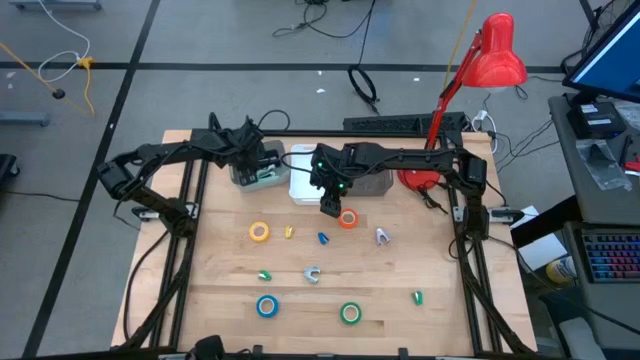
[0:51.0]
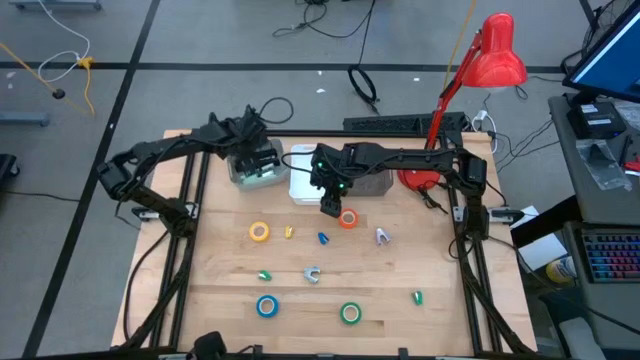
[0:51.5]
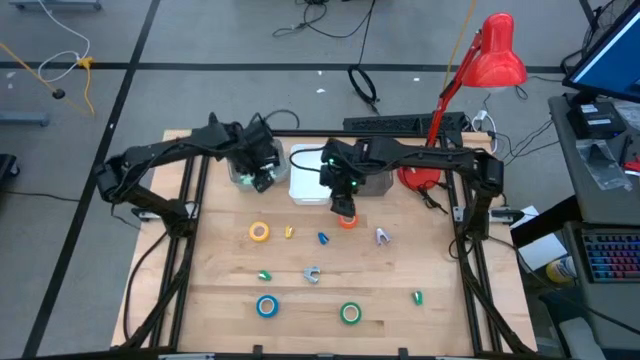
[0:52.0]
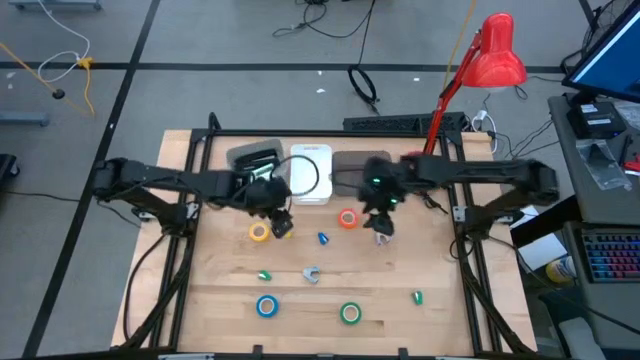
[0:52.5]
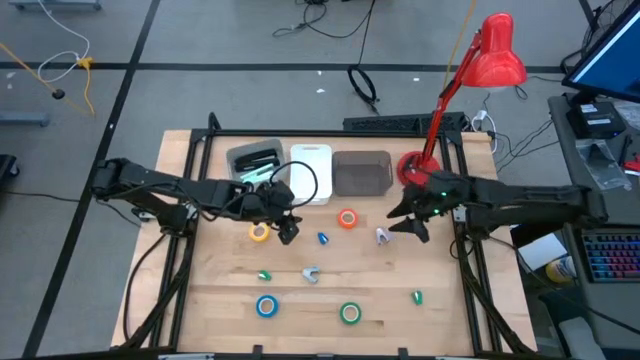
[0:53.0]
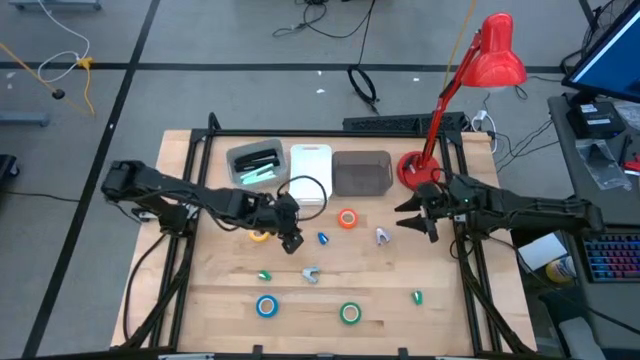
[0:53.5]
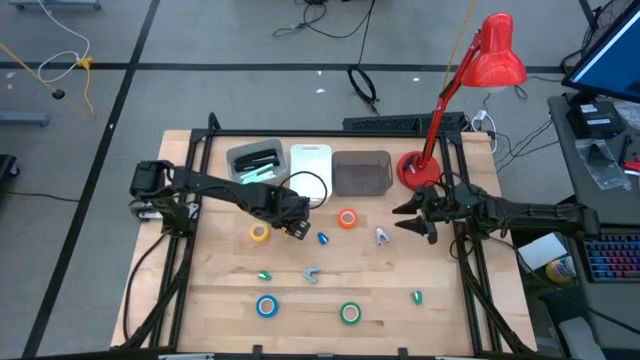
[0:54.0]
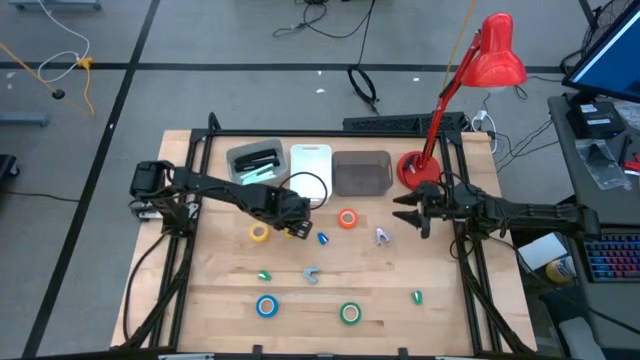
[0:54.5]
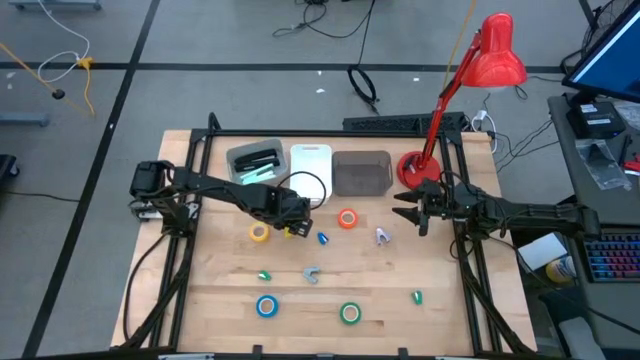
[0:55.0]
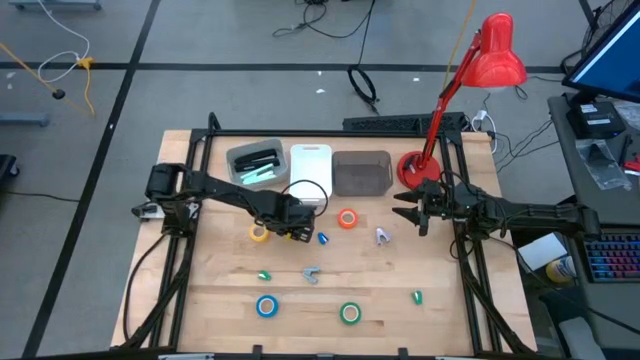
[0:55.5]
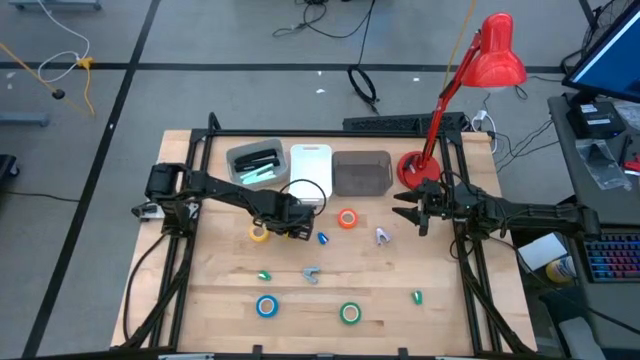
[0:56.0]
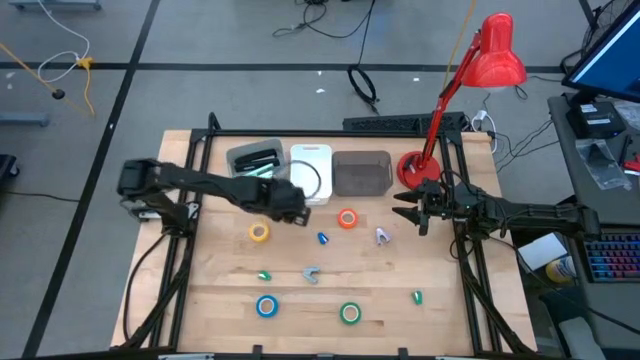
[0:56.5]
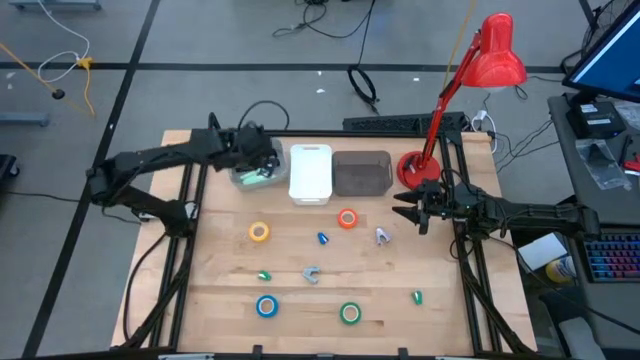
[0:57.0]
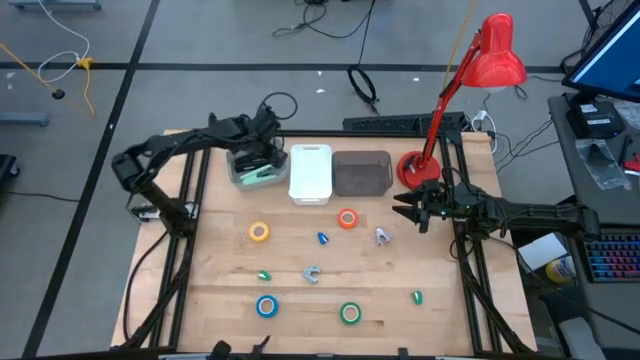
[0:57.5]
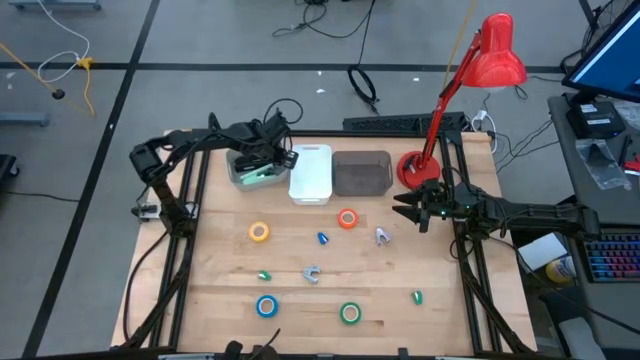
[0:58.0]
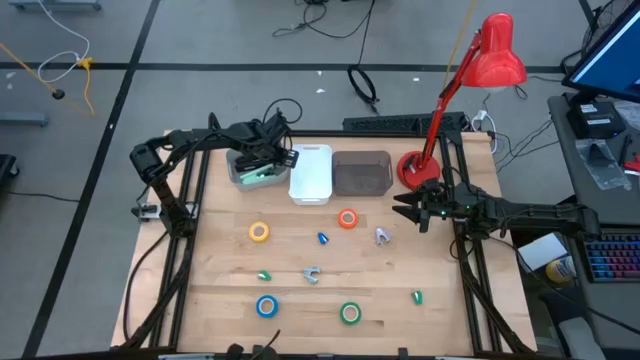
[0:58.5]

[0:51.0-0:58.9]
Task: Pick and place Stapler, Stapler remover, tape
Put the yellow stapler into the gray bin

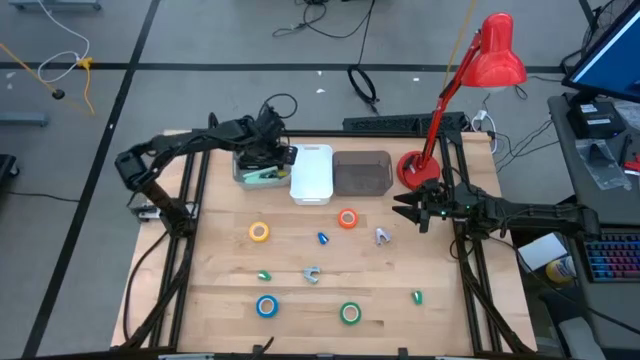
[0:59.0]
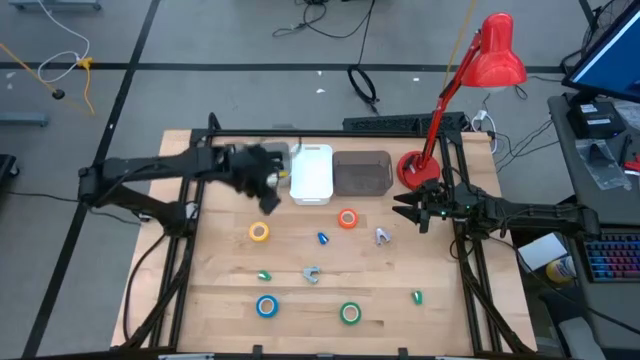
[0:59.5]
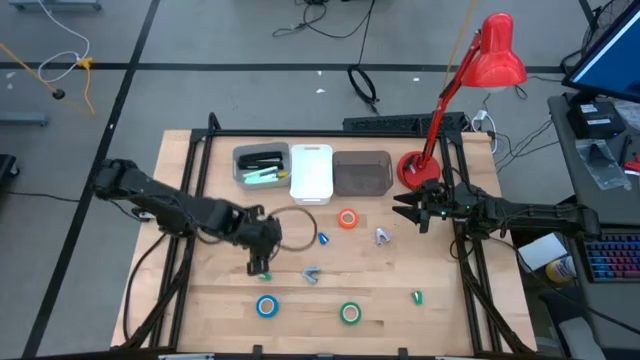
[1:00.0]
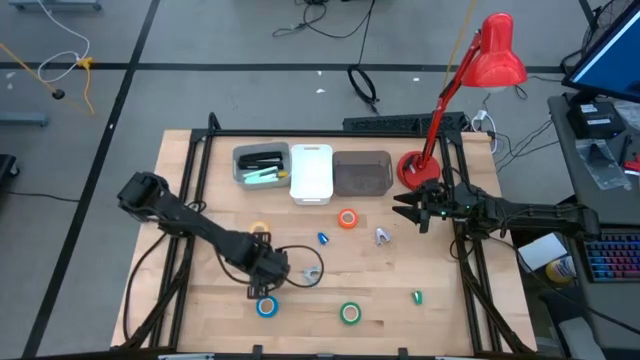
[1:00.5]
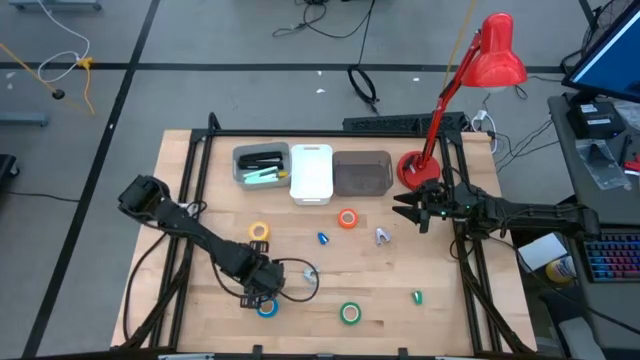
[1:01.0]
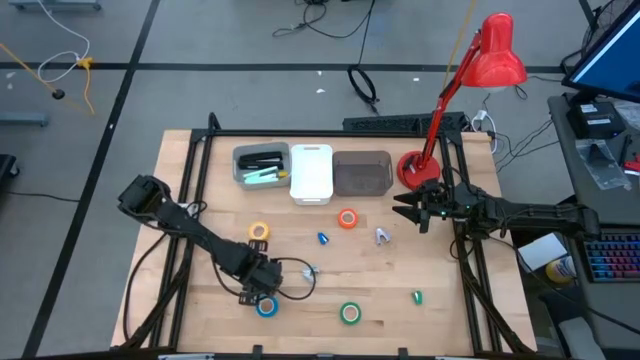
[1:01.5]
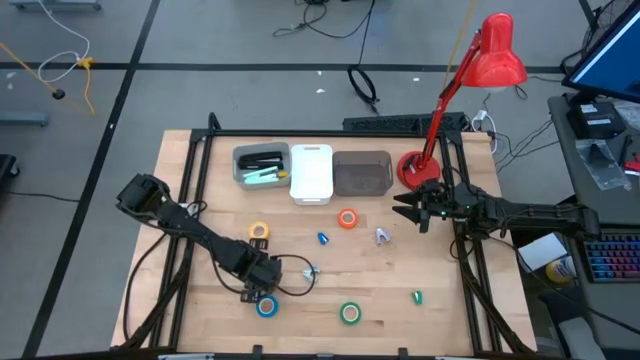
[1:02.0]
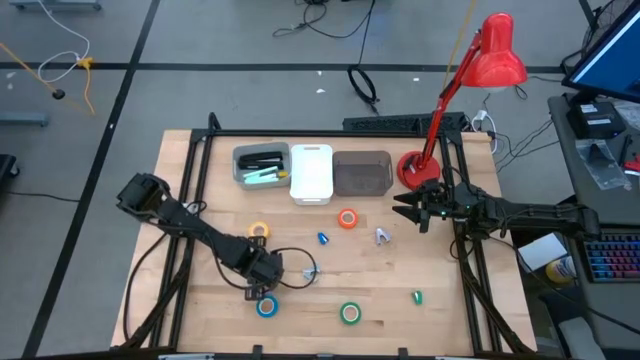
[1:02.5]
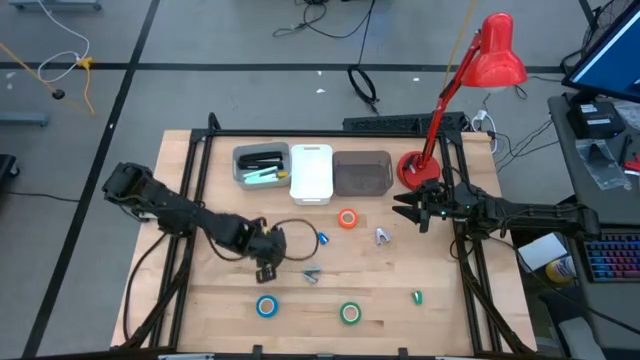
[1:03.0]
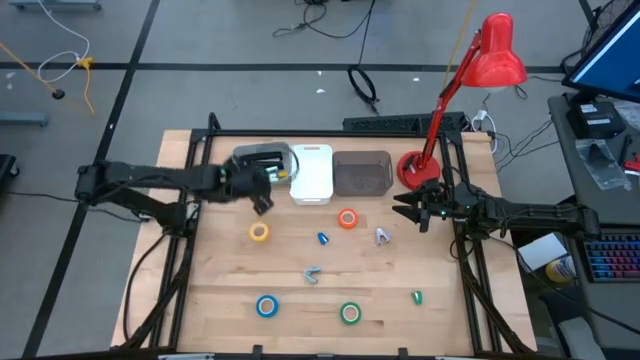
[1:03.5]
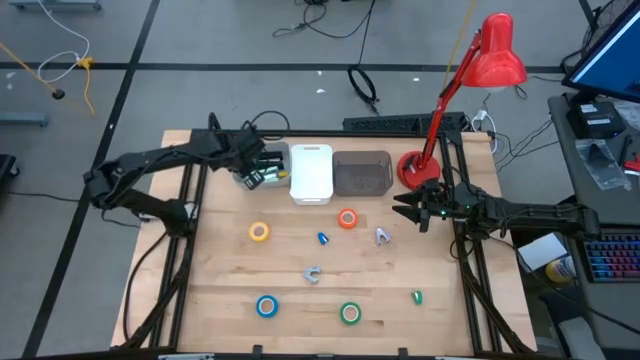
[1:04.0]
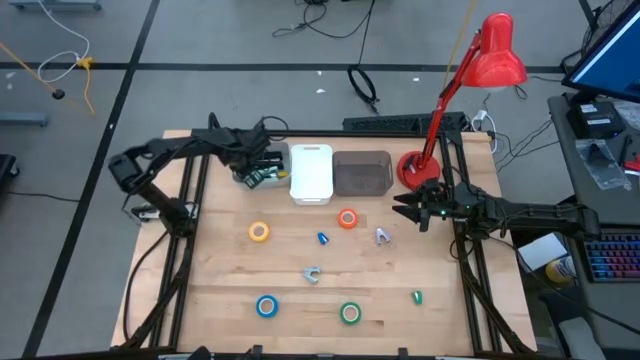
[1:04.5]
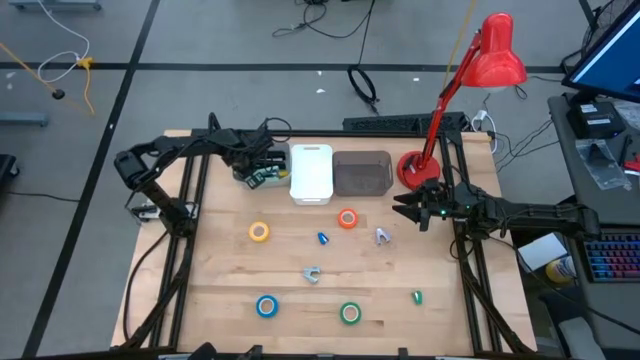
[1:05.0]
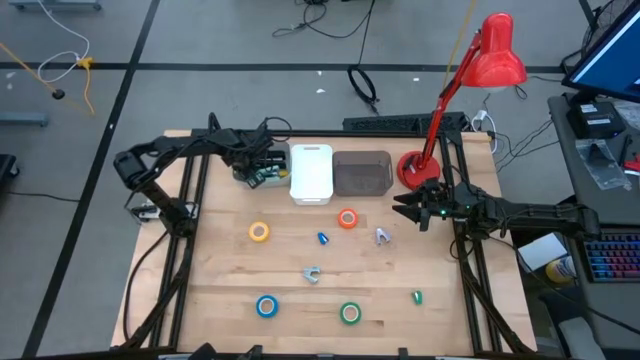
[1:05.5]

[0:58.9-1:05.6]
Put the left green stapler into the gray bin

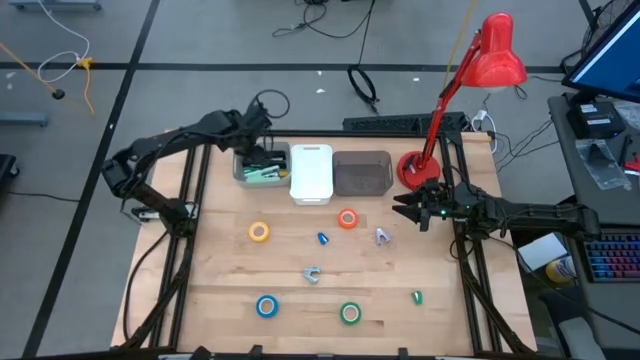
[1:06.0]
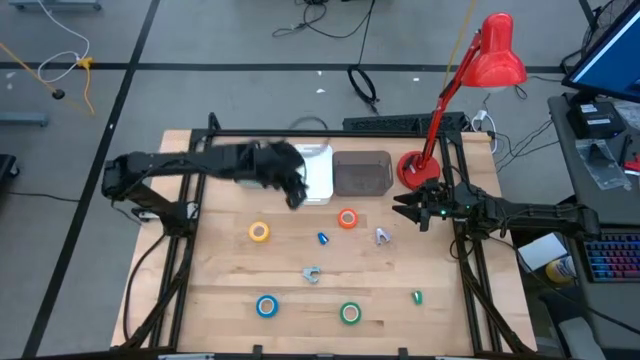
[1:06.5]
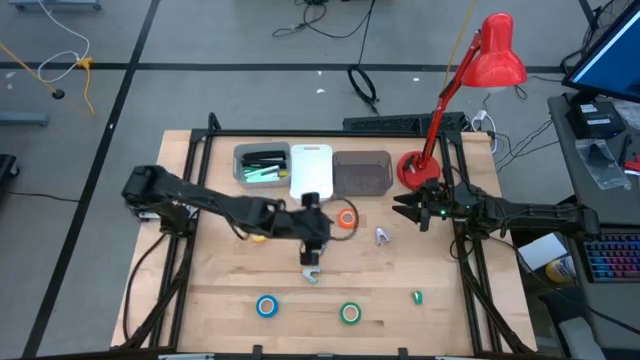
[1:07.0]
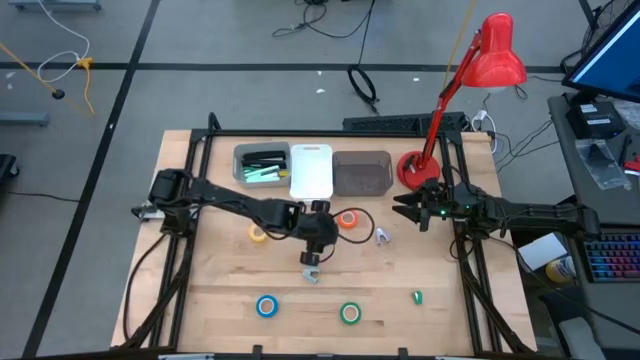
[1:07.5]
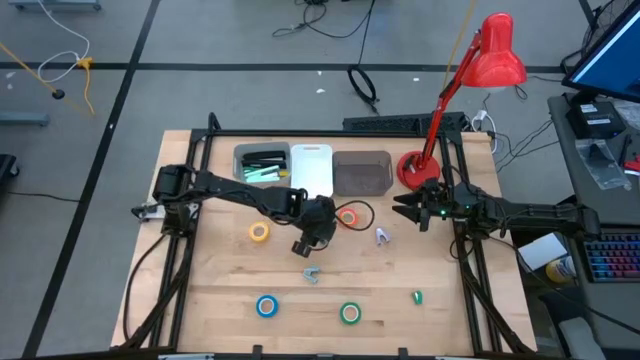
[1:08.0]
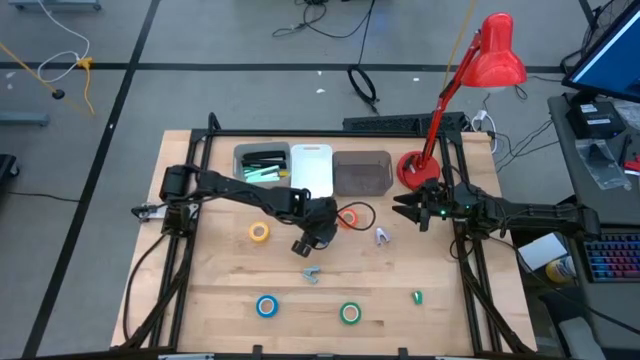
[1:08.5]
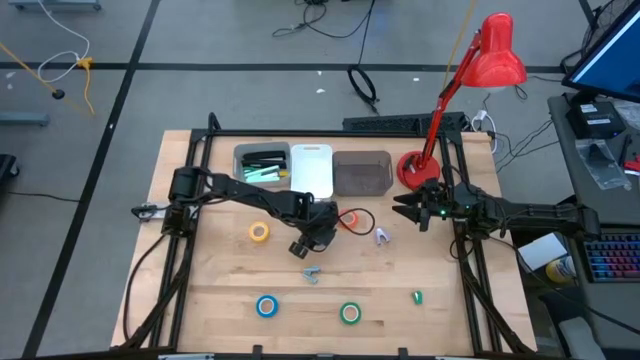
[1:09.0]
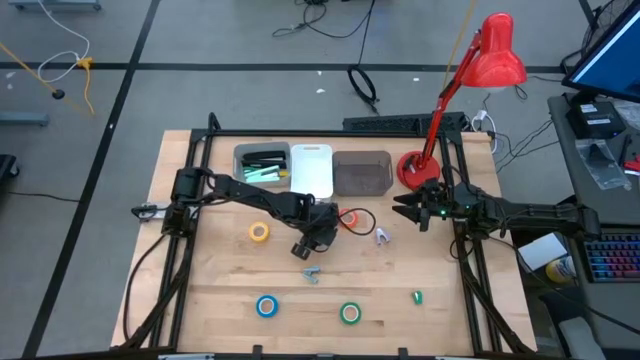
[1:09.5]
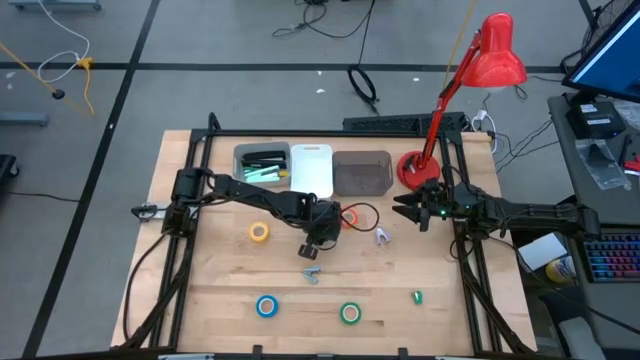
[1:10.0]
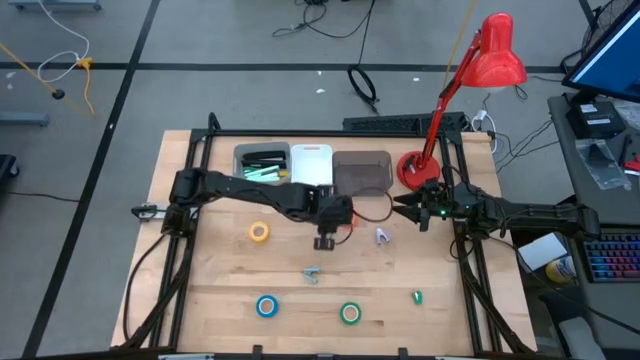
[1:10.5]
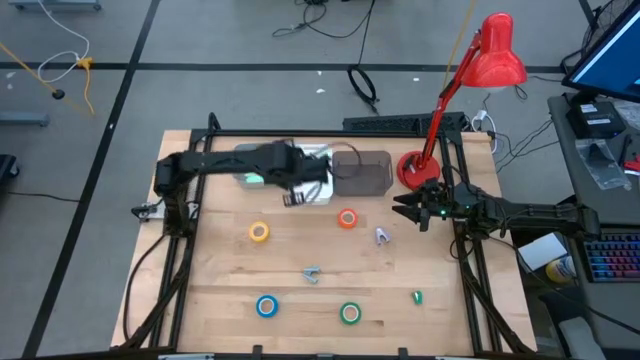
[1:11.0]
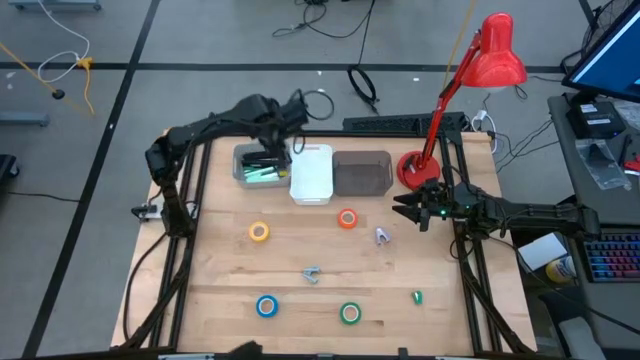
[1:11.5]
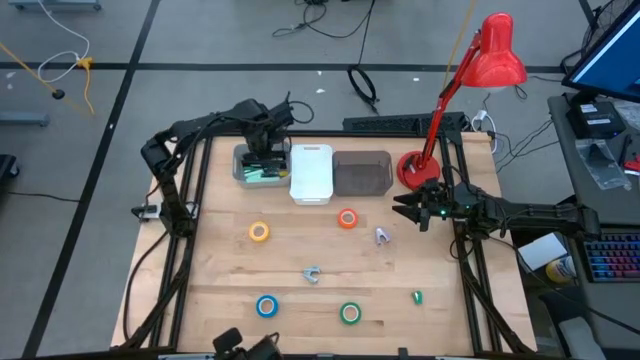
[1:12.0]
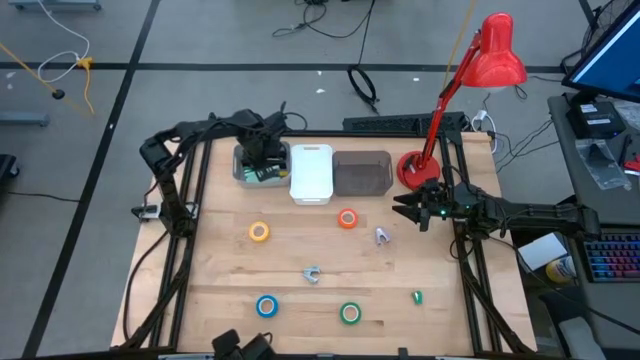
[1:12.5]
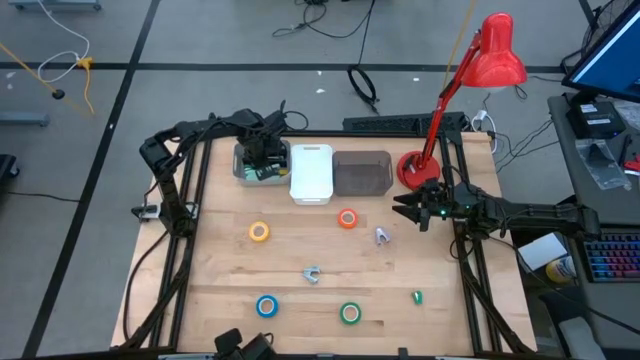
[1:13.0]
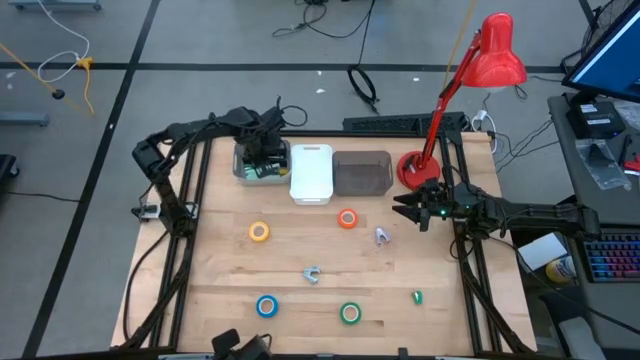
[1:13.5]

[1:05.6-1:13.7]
Put the blue stapler into the gray bin
